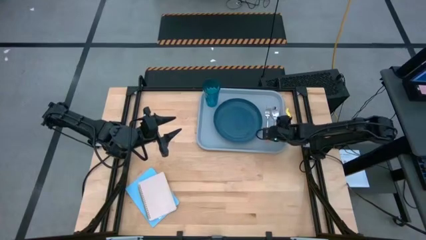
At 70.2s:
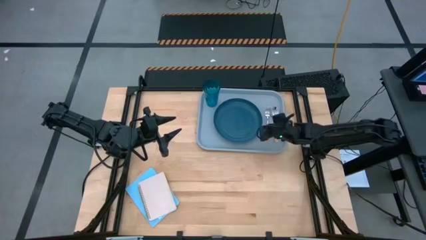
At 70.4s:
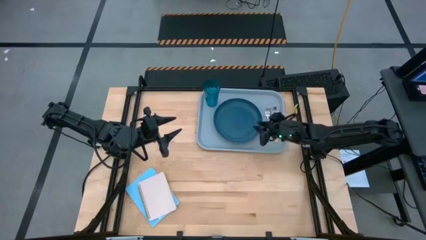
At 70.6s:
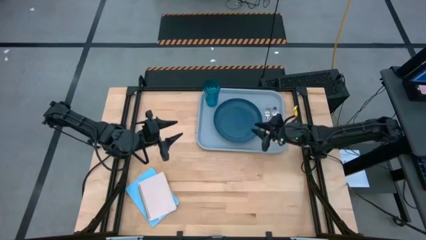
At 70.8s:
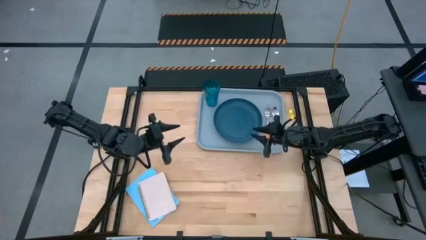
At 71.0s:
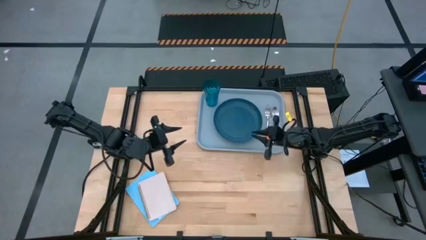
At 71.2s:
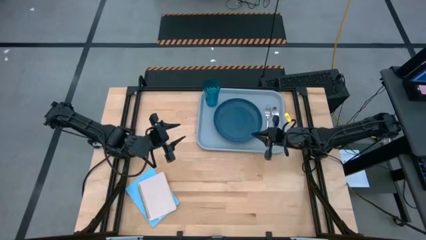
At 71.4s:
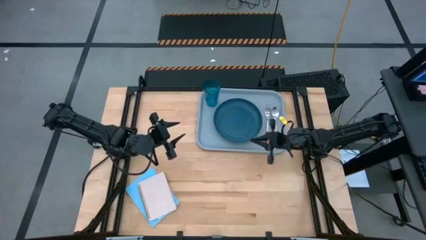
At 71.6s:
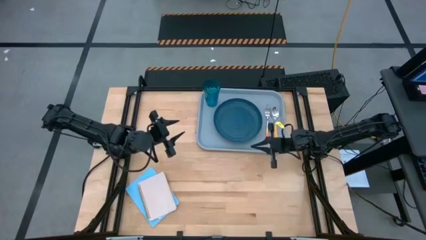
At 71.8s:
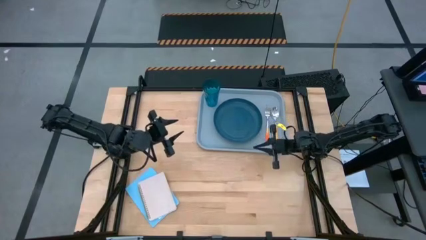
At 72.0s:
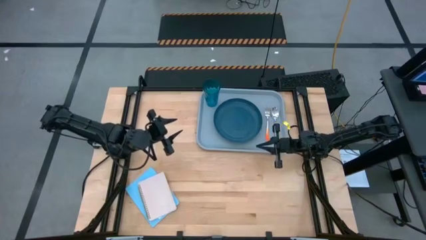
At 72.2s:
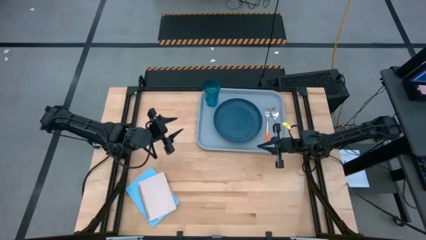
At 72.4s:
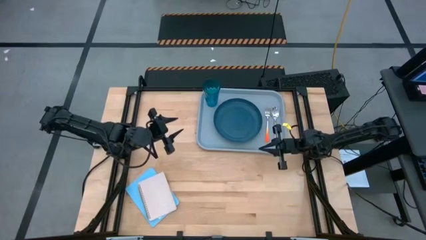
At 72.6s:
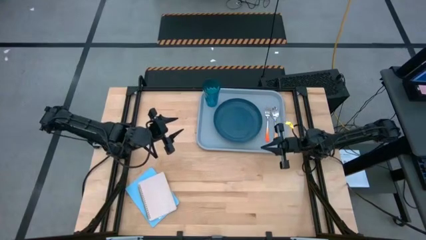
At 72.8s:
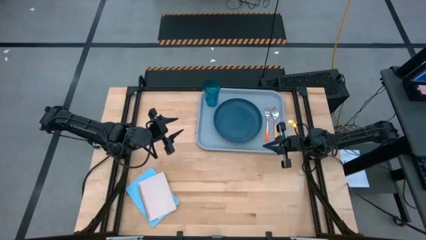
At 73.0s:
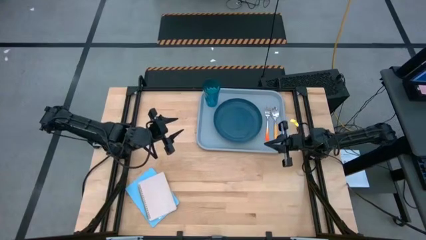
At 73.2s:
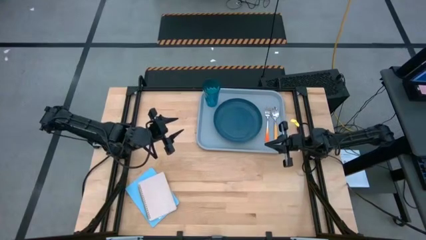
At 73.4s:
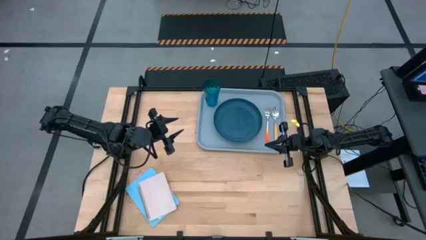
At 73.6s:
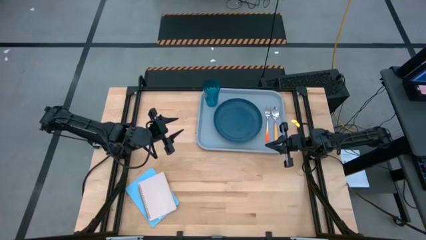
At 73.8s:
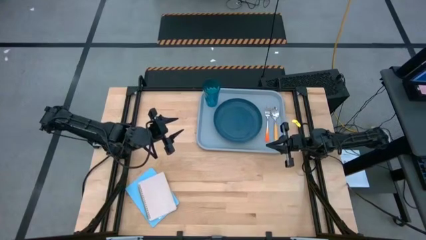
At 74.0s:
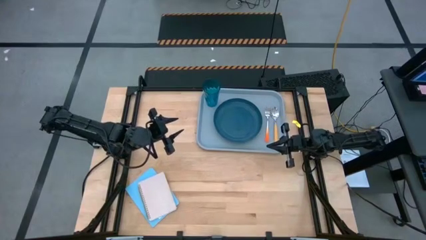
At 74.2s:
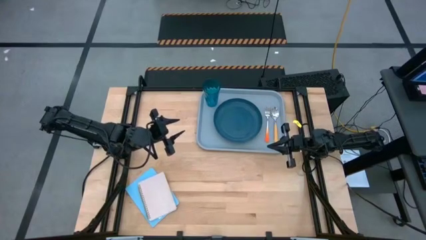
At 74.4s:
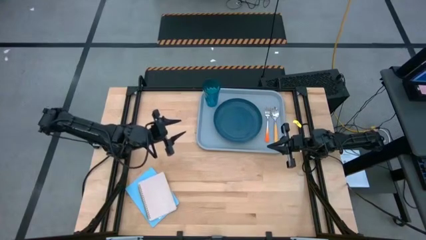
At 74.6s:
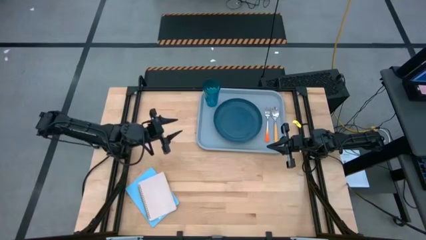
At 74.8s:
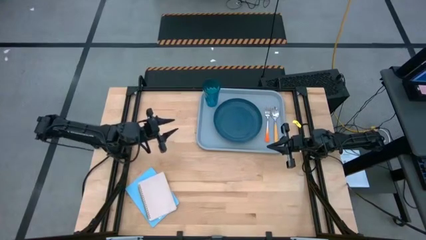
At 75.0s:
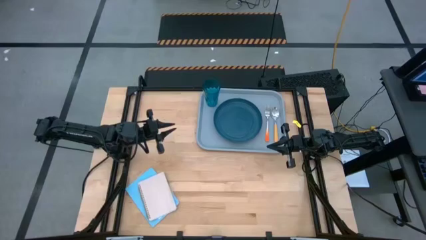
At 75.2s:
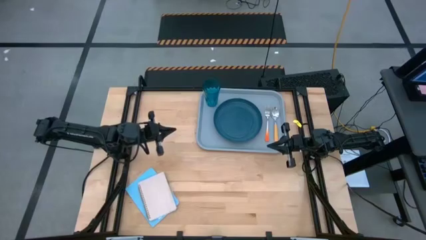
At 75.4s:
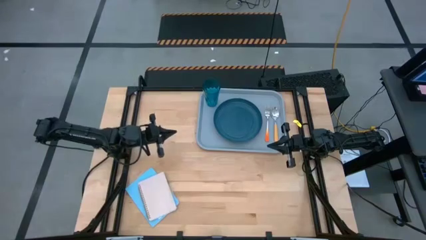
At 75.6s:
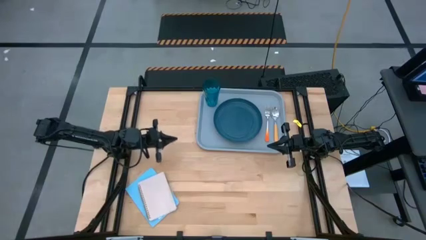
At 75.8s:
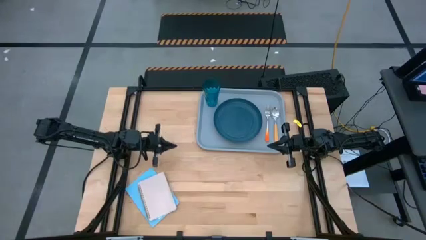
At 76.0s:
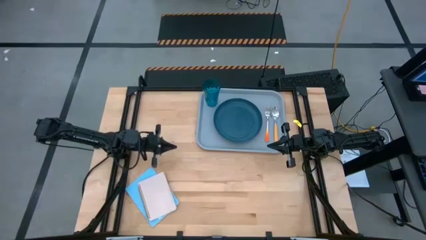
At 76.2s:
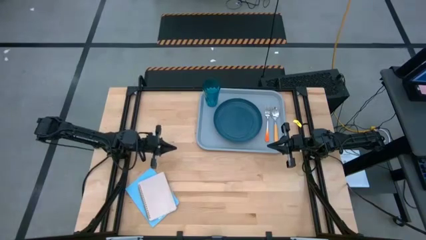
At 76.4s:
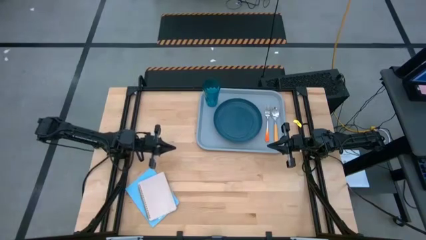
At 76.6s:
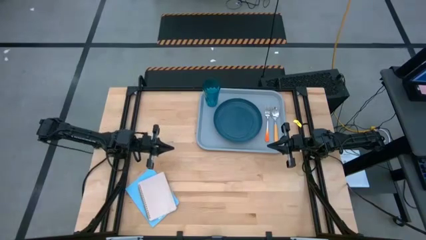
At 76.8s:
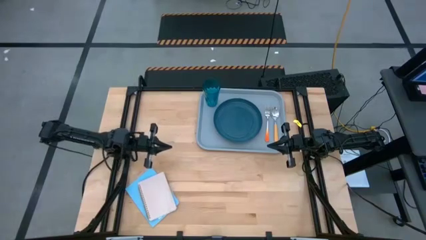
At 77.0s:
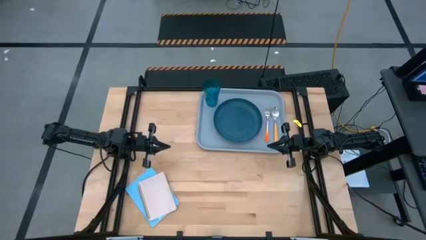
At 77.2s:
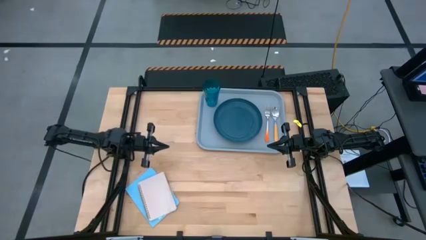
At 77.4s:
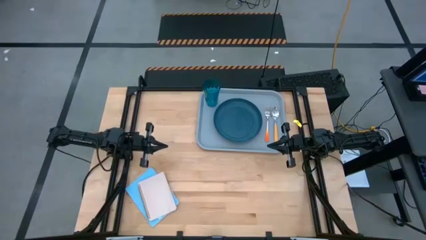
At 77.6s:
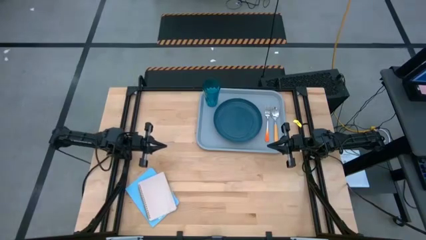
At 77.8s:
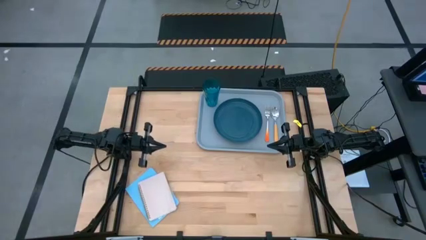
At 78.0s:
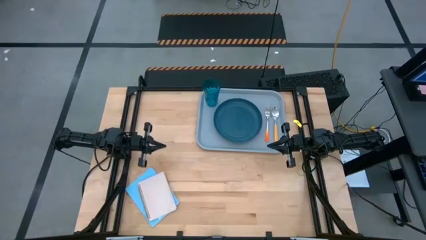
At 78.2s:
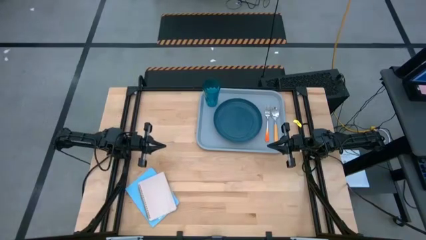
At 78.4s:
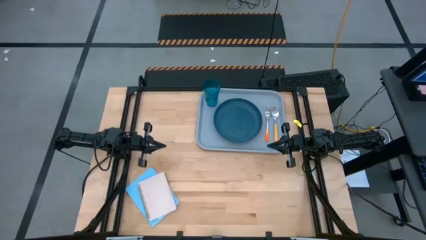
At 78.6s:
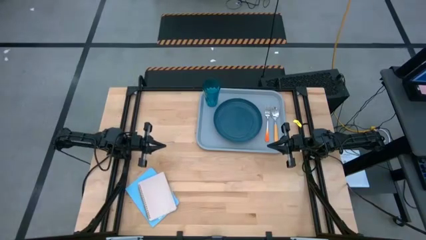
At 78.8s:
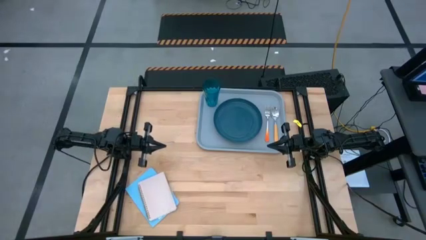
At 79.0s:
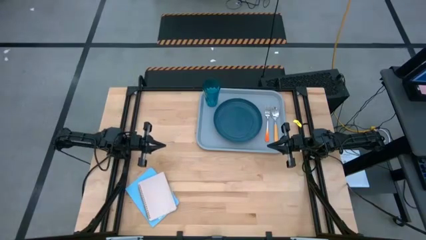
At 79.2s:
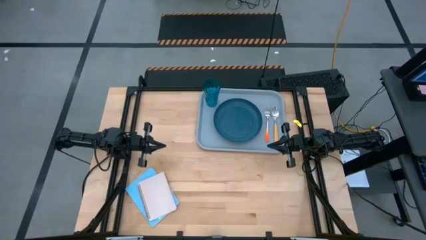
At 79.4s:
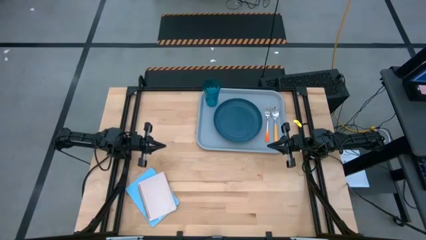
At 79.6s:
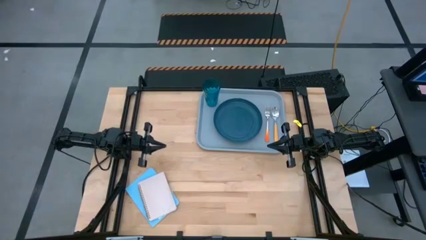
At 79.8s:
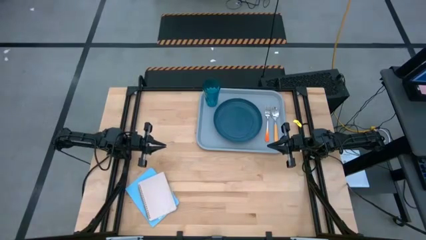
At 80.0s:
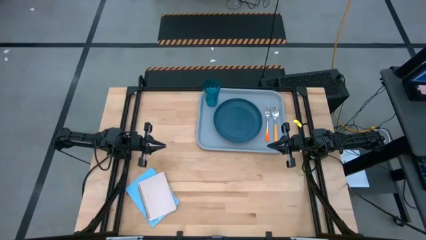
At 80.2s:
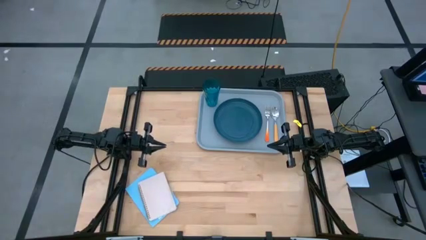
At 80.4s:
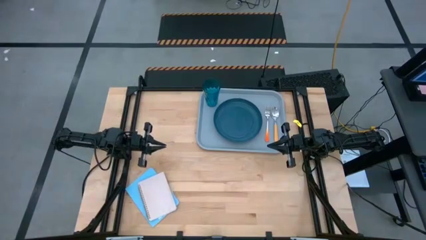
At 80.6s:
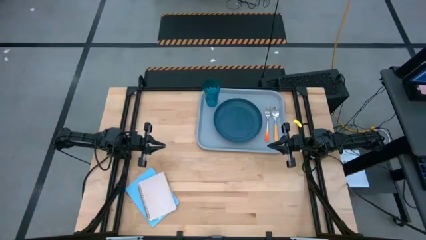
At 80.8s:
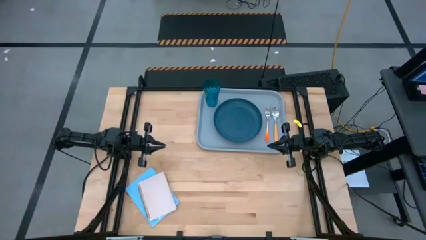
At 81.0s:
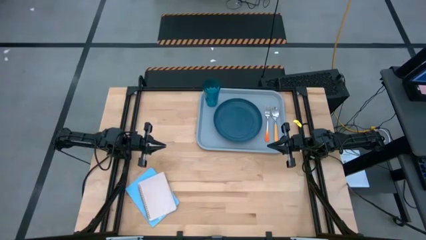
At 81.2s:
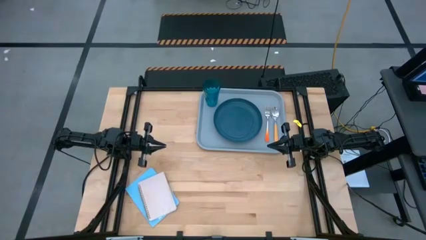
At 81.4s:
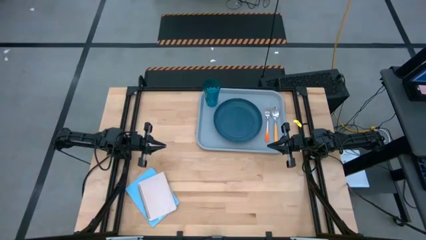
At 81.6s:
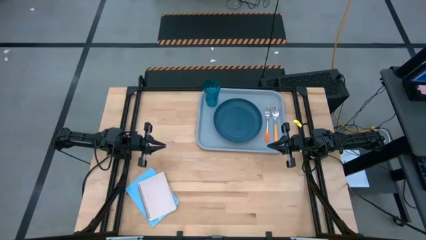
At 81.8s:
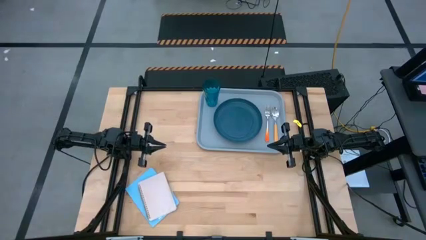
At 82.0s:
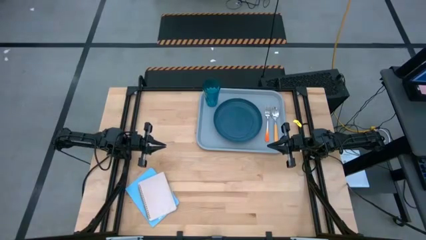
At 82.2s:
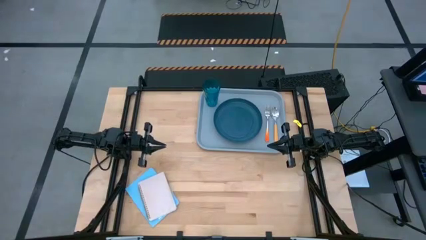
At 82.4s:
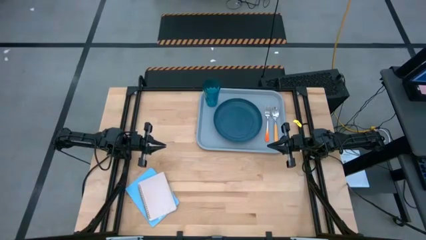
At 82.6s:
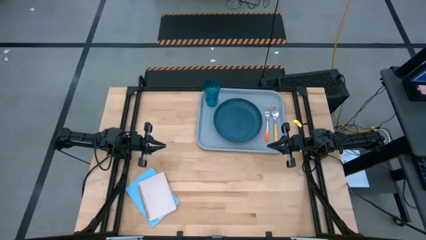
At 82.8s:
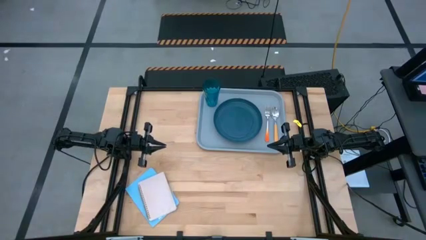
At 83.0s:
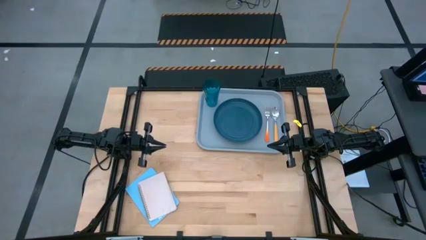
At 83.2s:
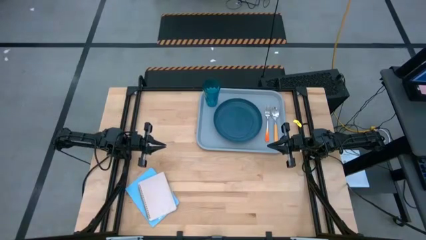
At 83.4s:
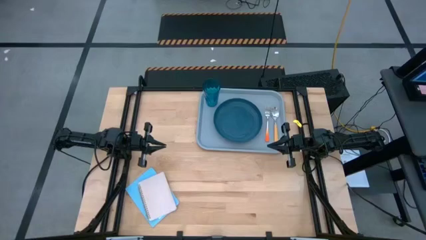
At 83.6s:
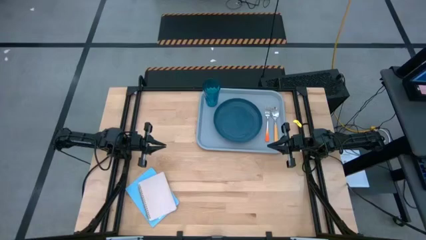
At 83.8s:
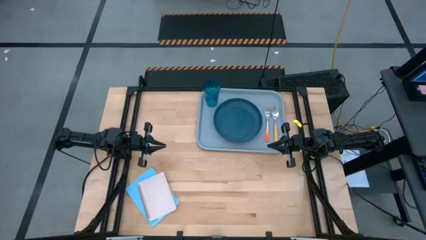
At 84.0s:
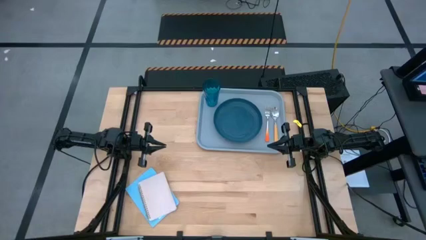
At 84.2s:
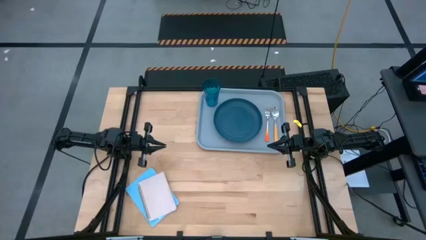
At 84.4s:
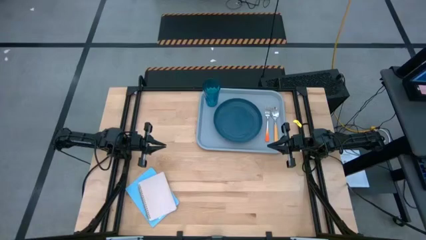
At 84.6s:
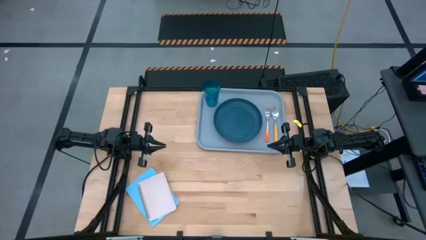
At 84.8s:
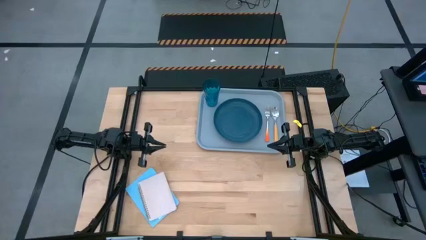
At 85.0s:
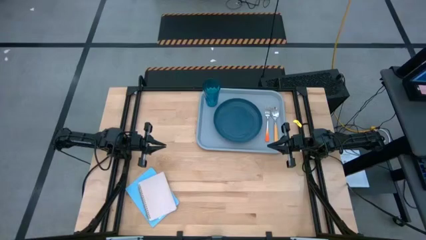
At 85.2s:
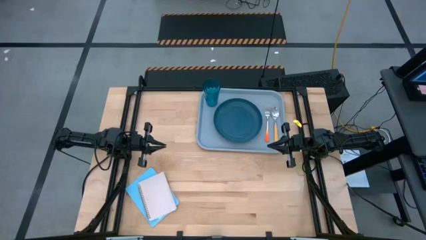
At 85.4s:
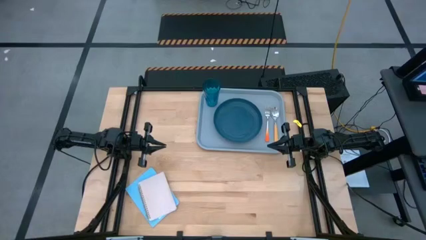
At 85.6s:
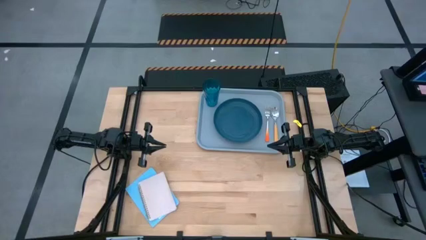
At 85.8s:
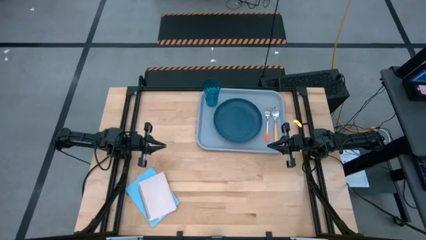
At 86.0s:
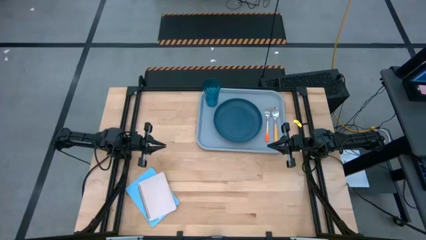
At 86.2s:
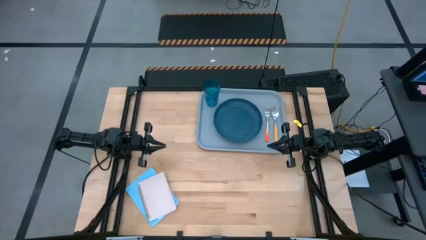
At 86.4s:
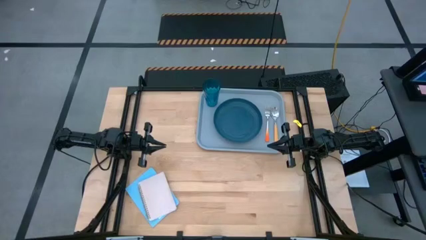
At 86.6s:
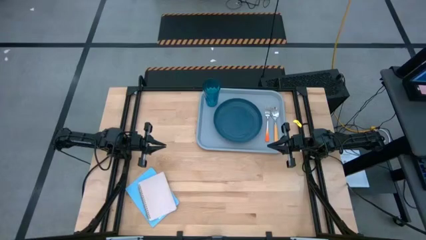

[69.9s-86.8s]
Task: Pick and place plate/cup/fork/spoon on tray
Return to Home Position
